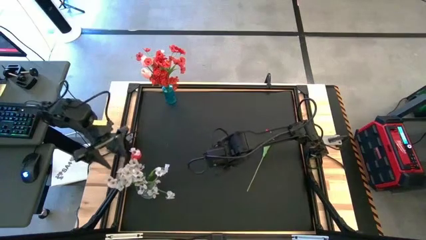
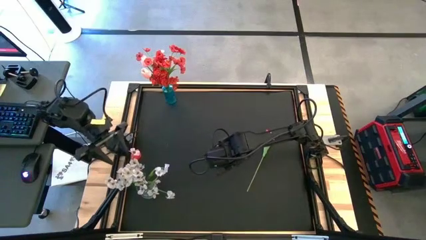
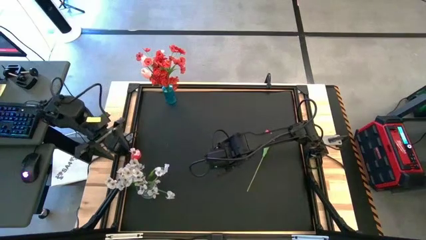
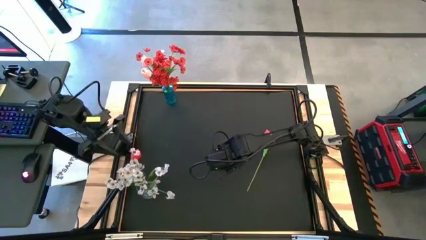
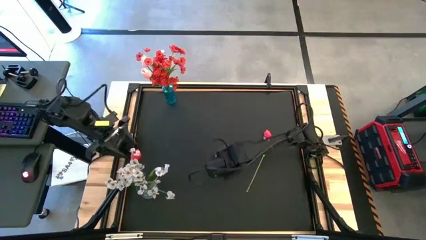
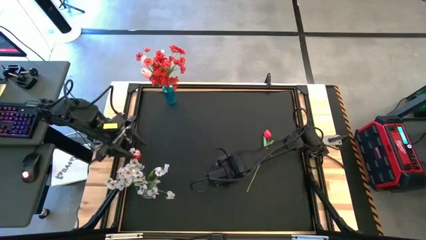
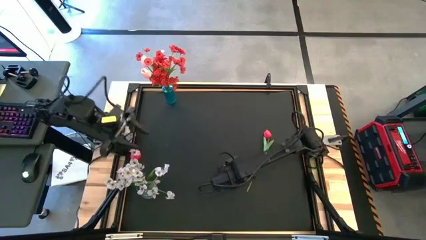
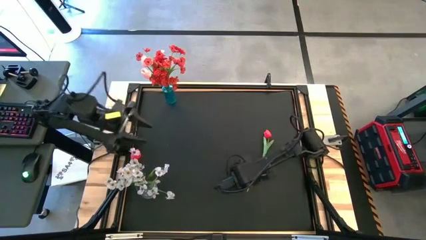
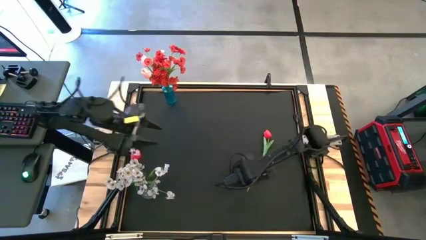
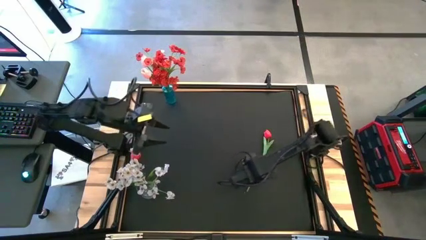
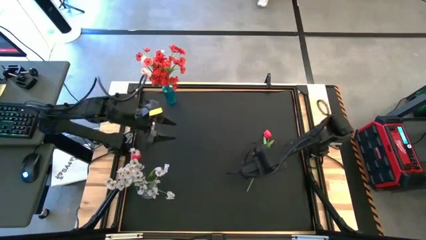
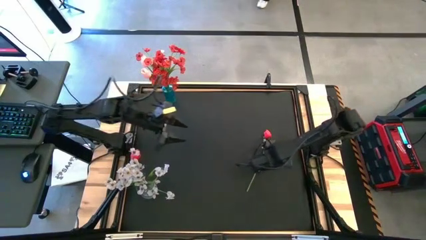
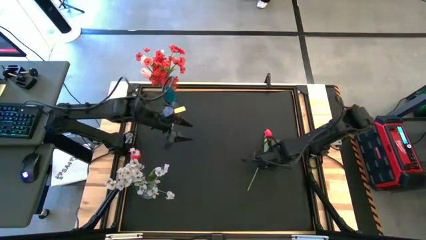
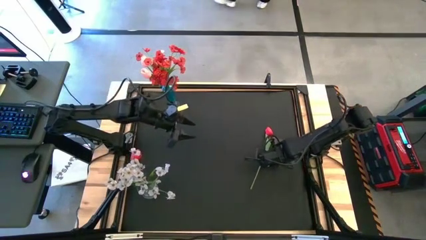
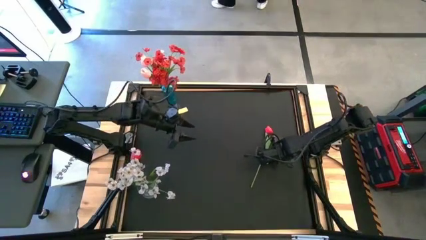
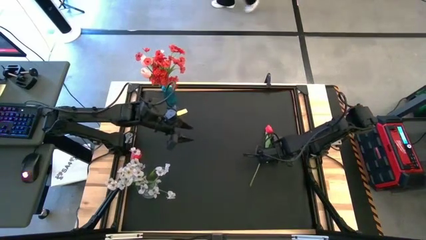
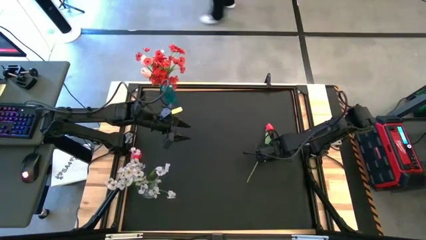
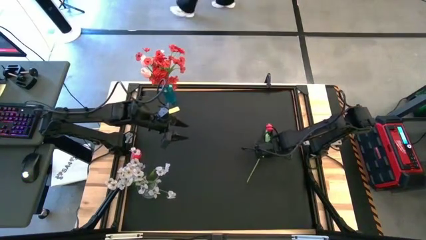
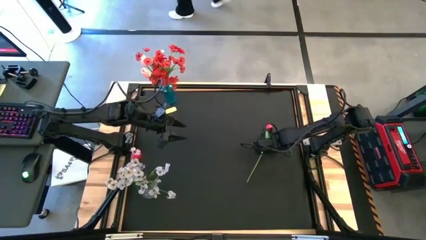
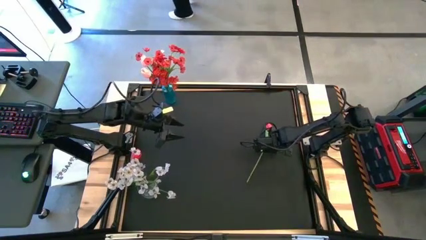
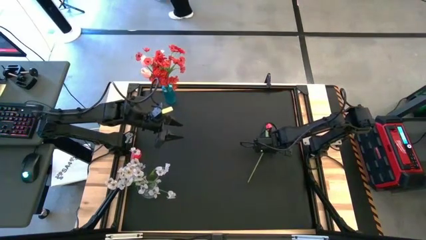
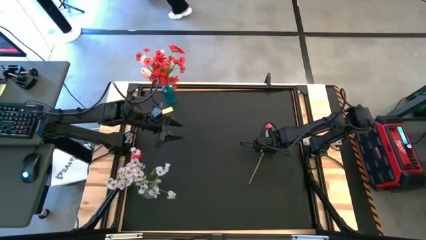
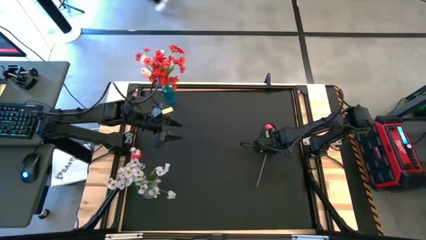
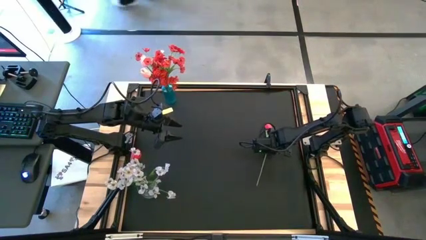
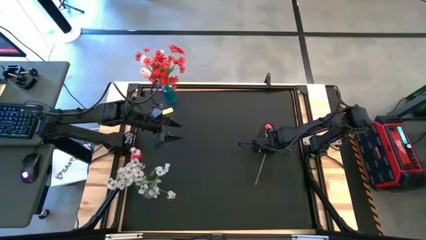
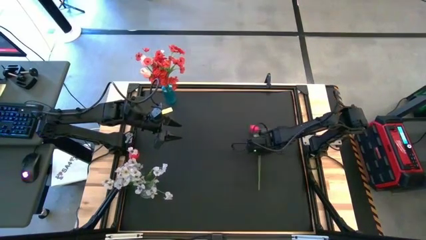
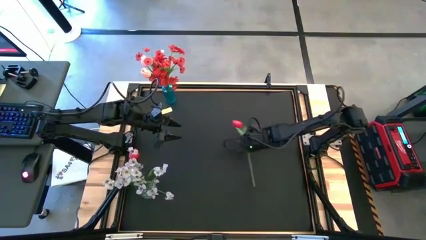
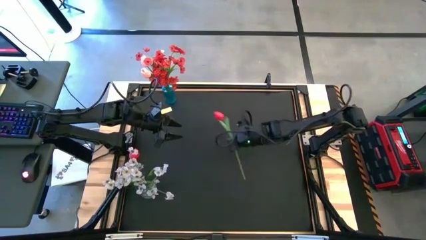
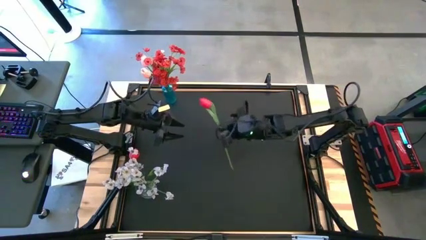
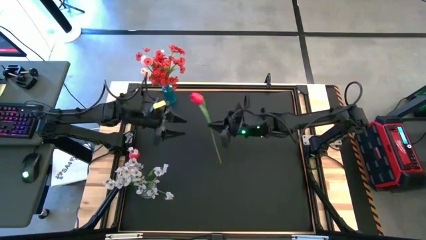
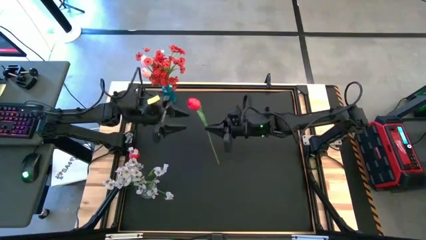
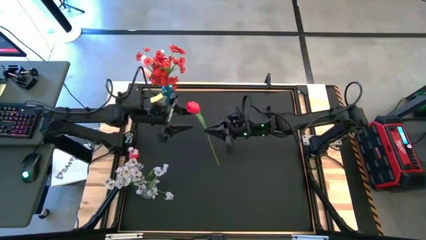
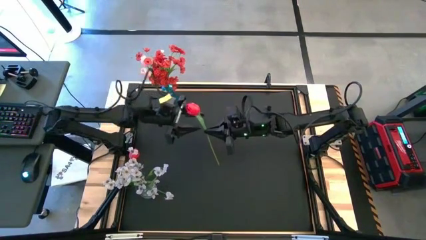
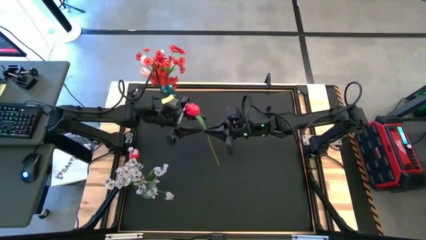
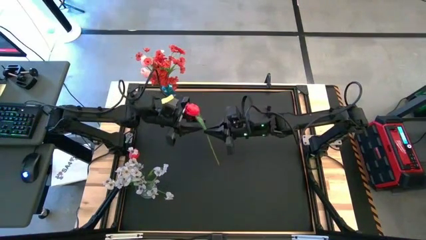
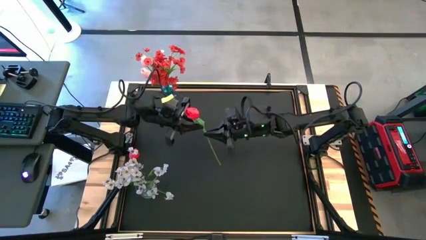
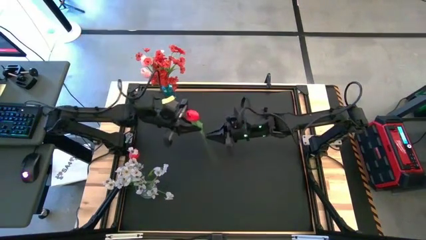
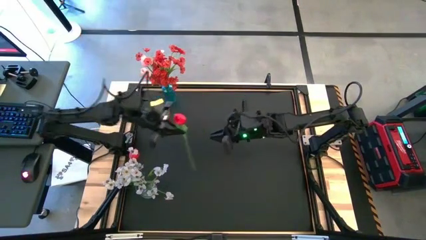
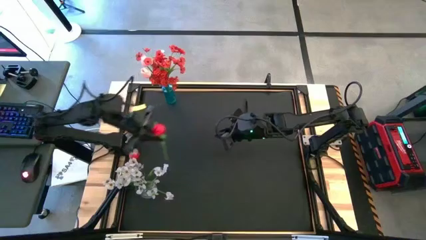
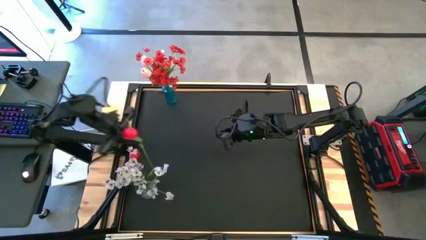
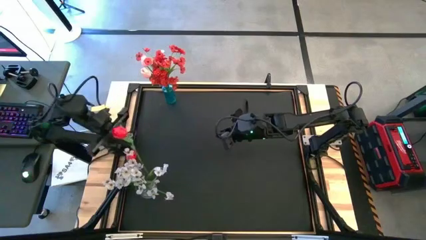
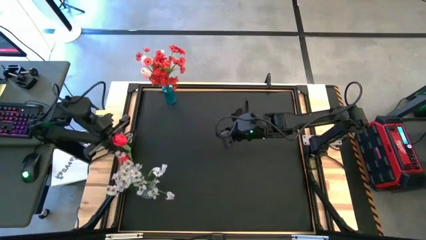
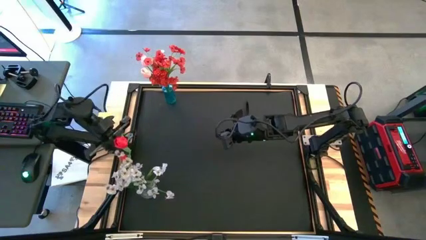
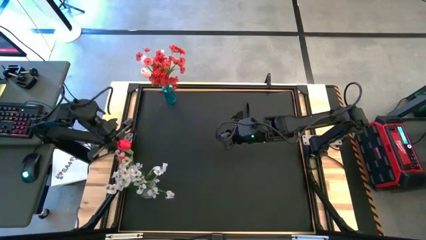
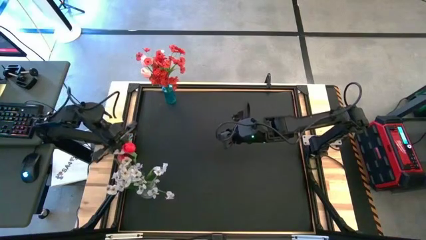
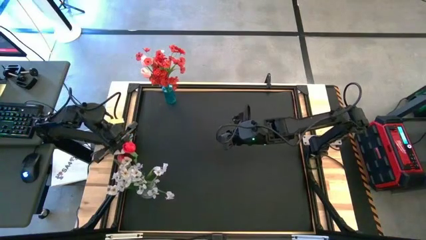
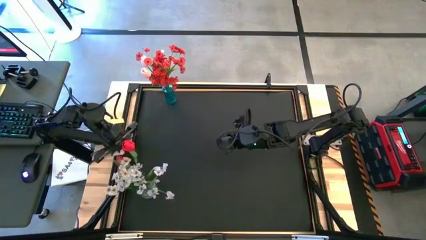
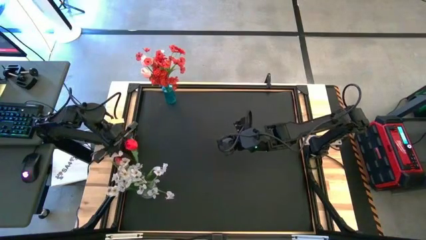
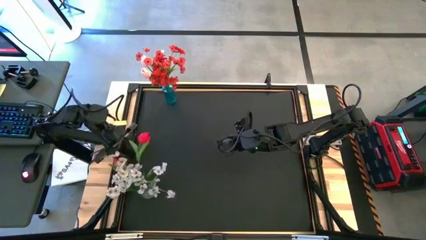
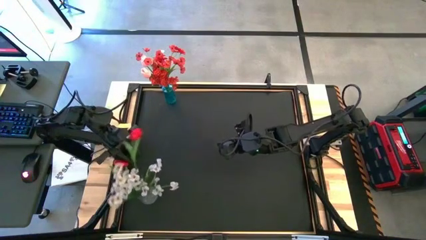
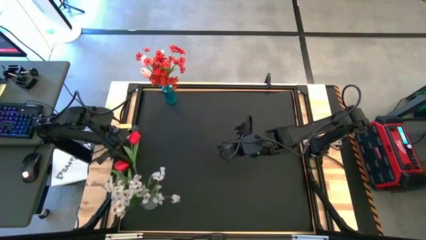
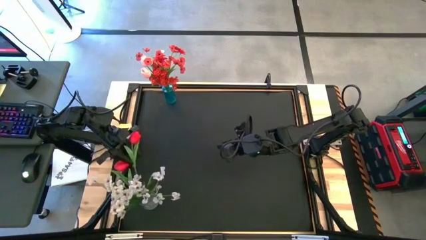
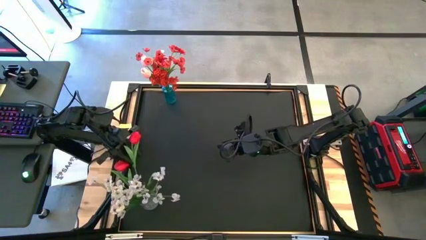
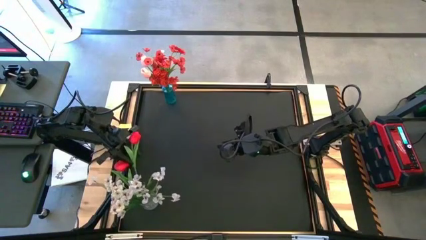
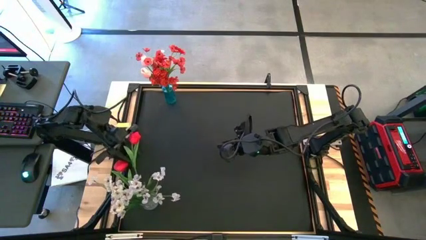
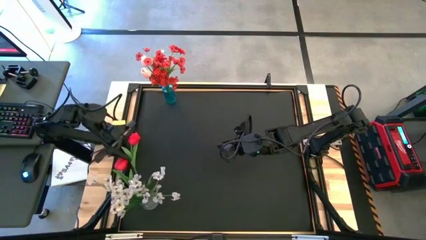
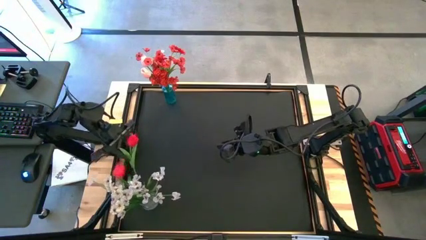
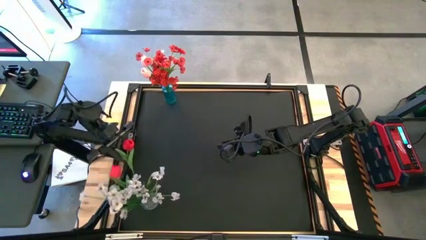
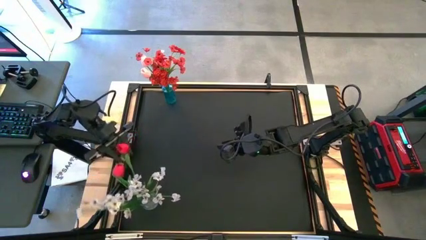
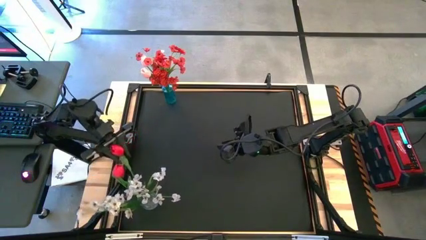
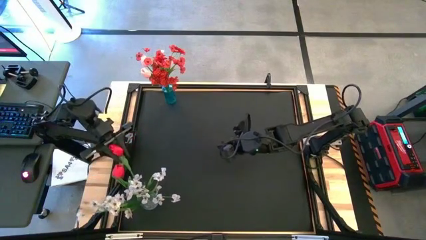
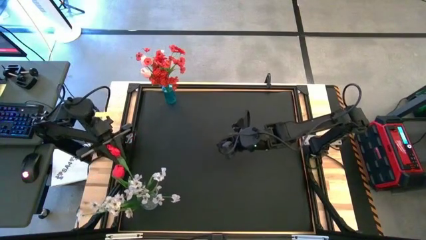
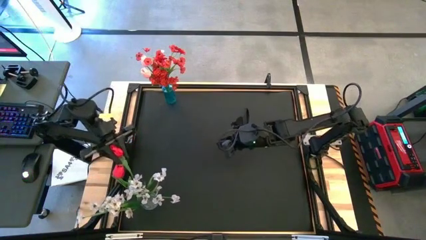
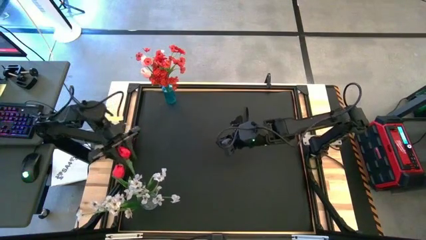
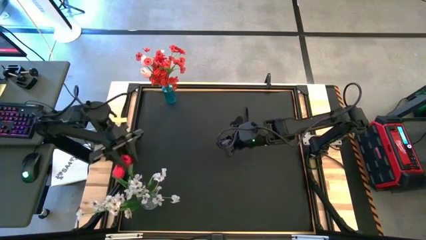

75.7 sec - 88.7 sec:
Task: Sort flowers into vase by color
Put the red tulip into the transparent vase
